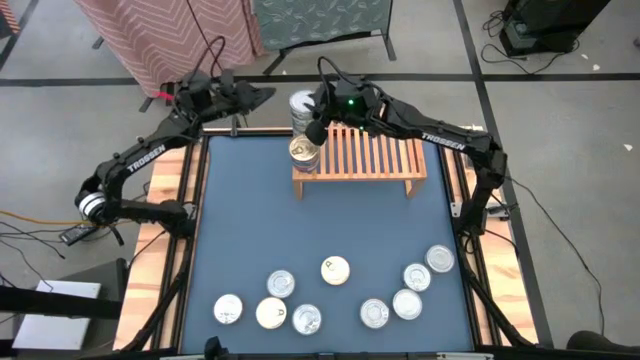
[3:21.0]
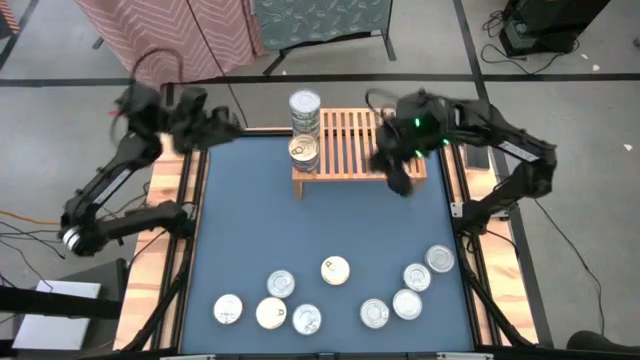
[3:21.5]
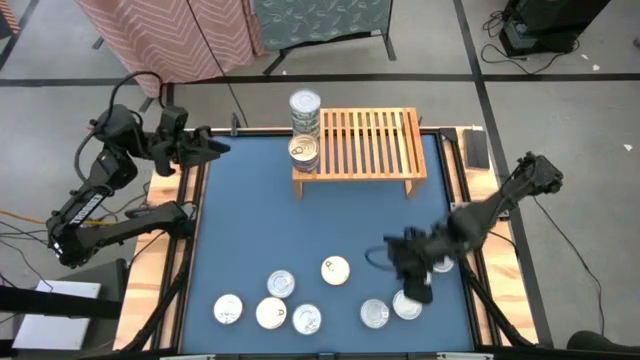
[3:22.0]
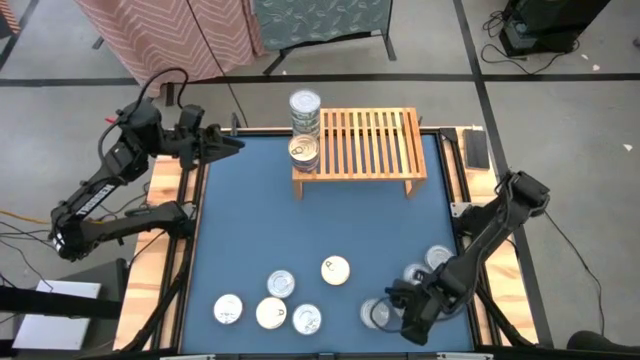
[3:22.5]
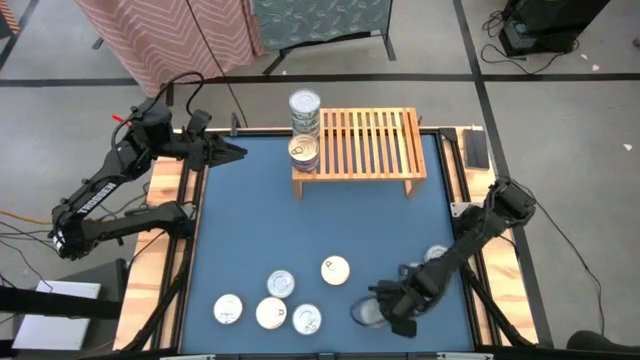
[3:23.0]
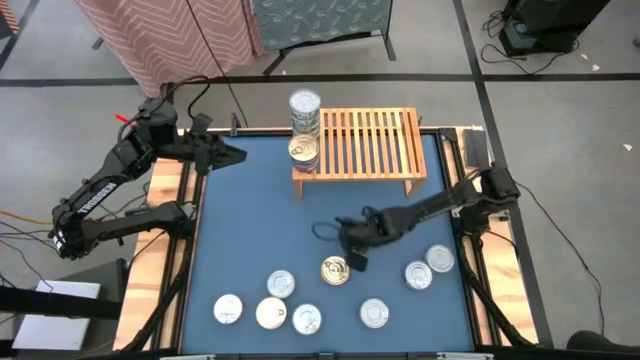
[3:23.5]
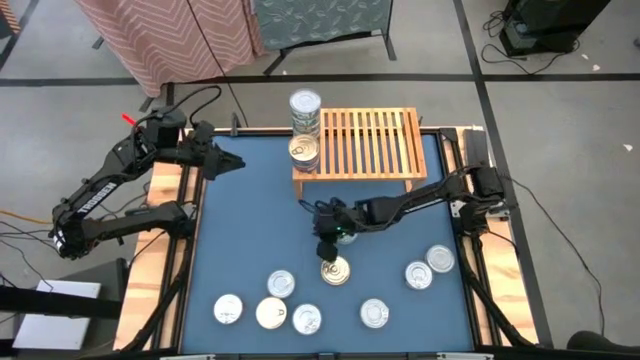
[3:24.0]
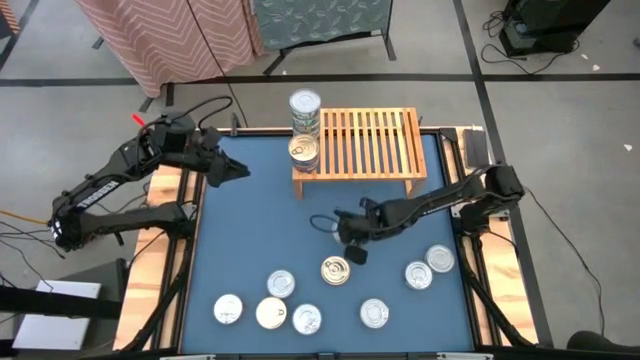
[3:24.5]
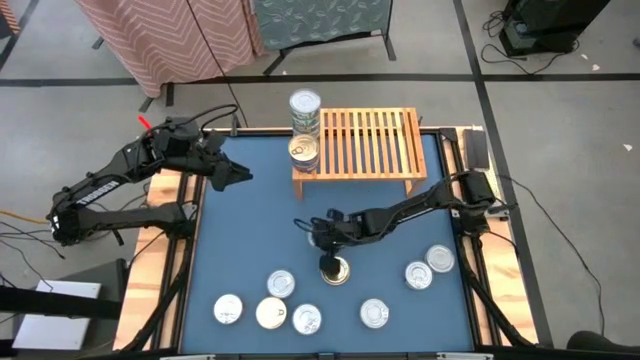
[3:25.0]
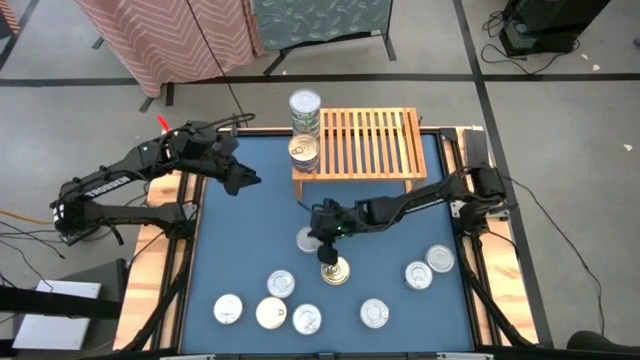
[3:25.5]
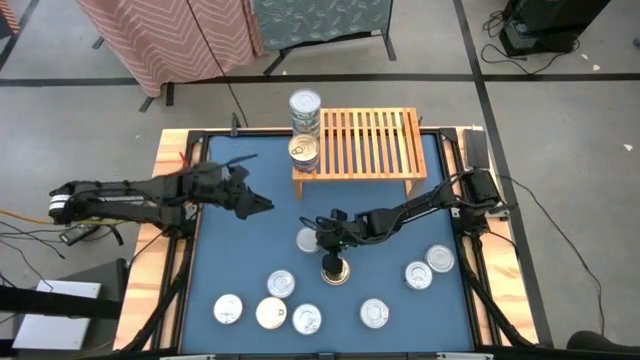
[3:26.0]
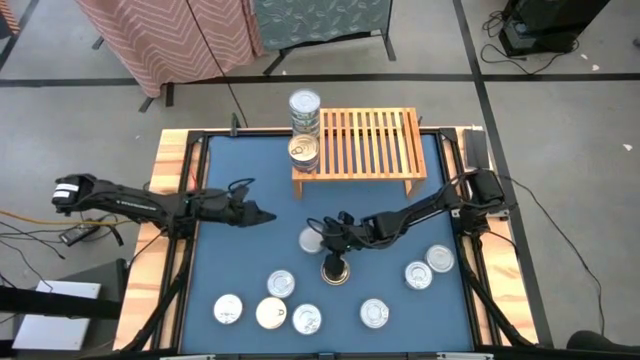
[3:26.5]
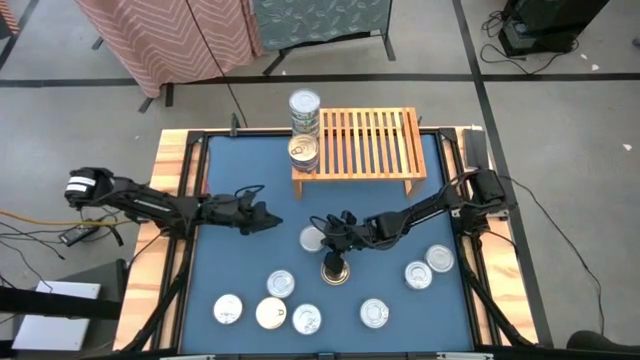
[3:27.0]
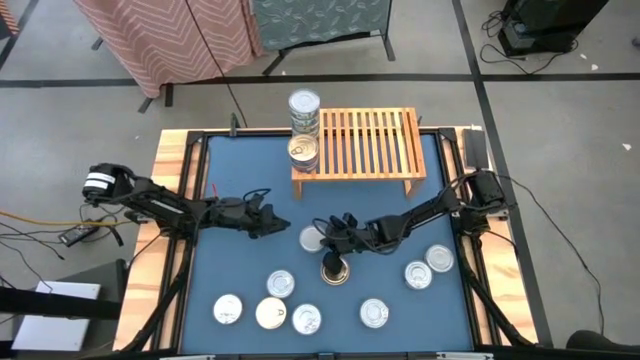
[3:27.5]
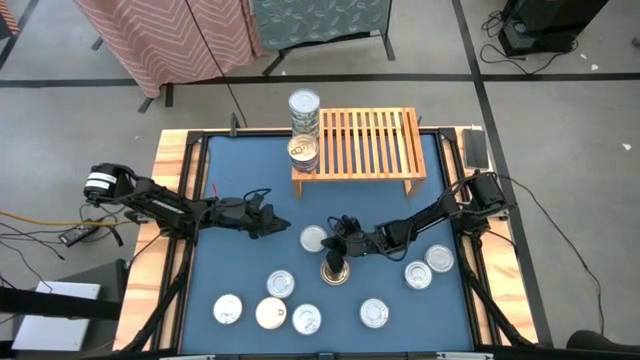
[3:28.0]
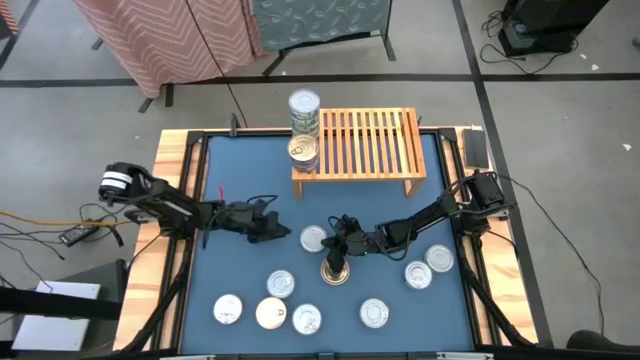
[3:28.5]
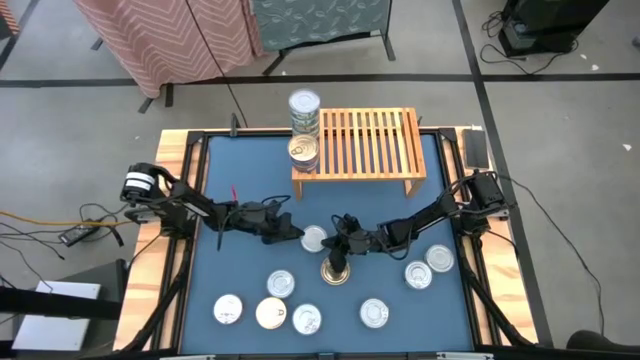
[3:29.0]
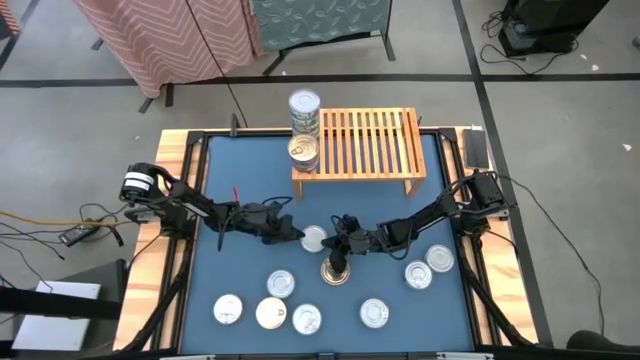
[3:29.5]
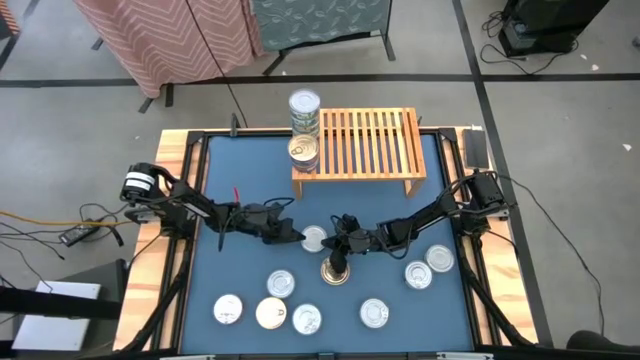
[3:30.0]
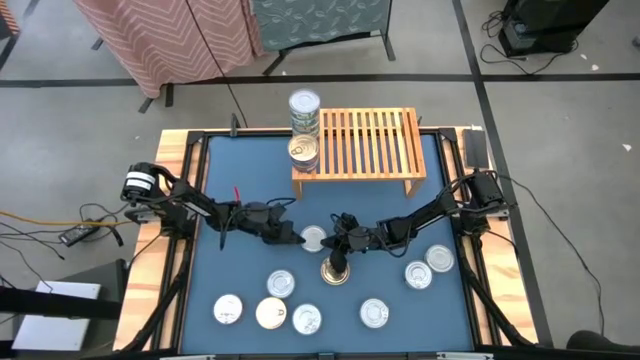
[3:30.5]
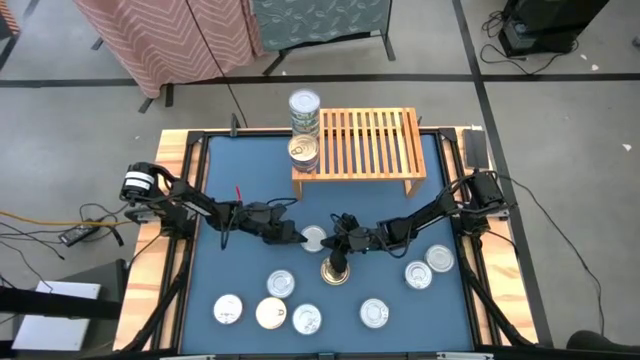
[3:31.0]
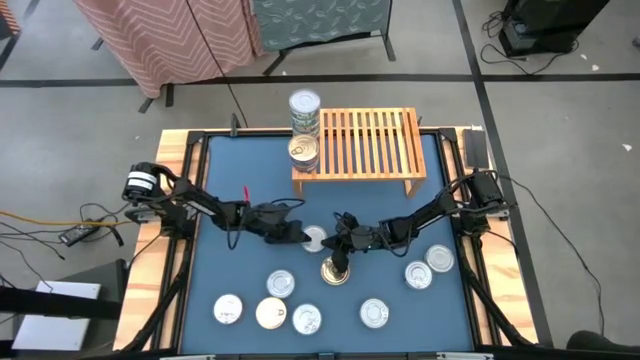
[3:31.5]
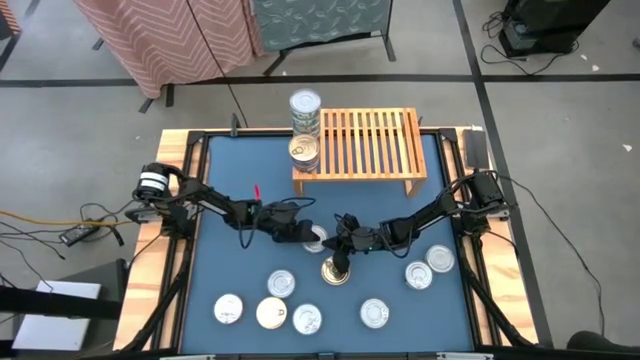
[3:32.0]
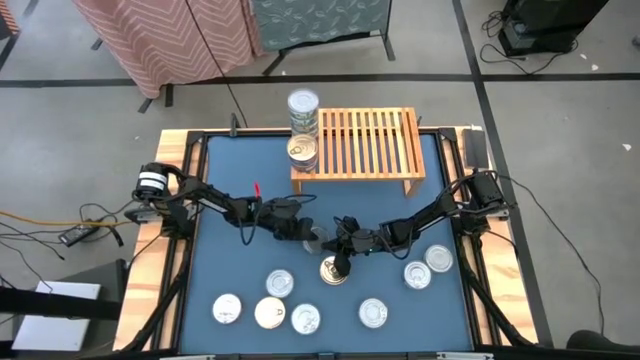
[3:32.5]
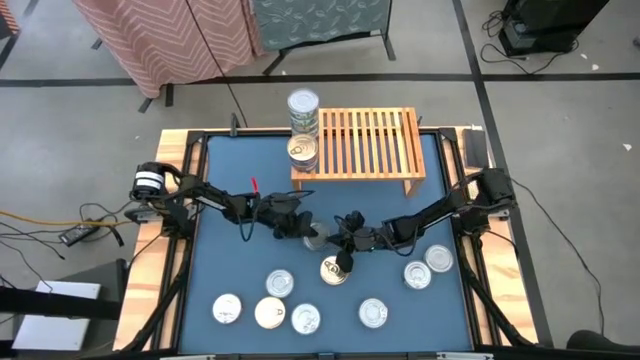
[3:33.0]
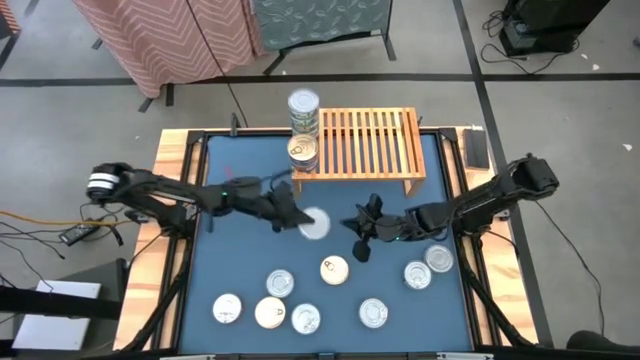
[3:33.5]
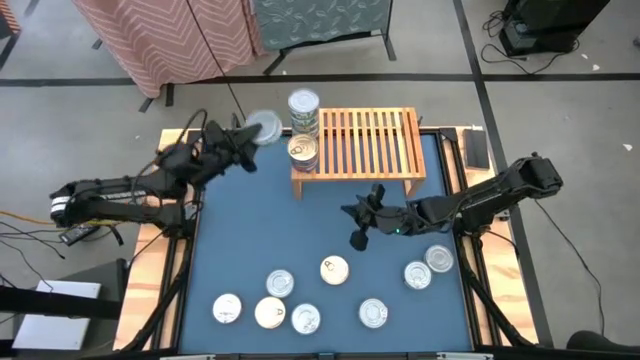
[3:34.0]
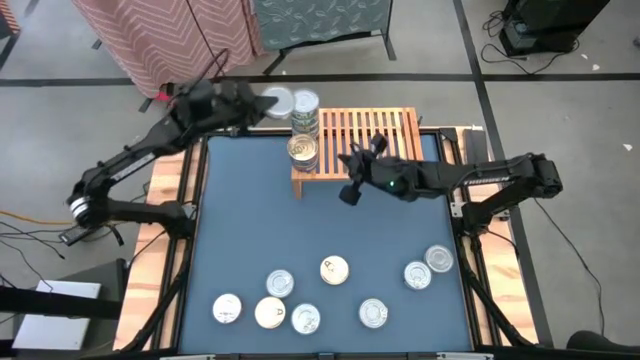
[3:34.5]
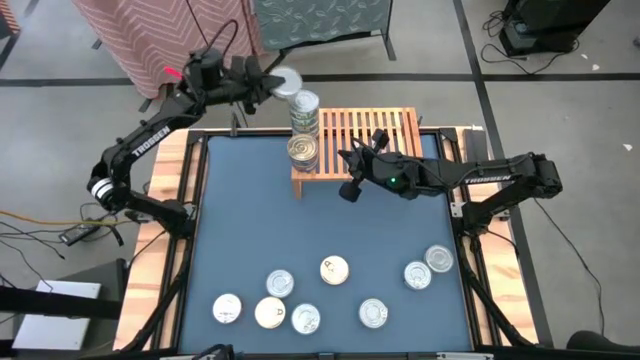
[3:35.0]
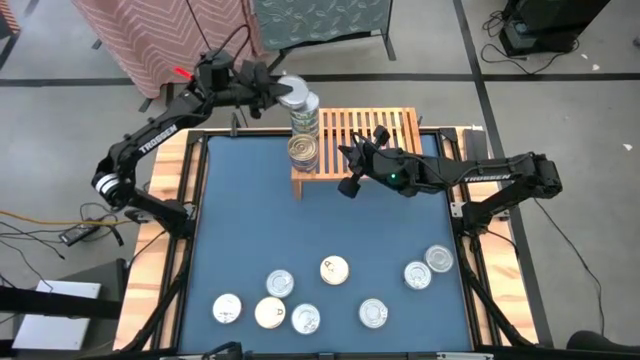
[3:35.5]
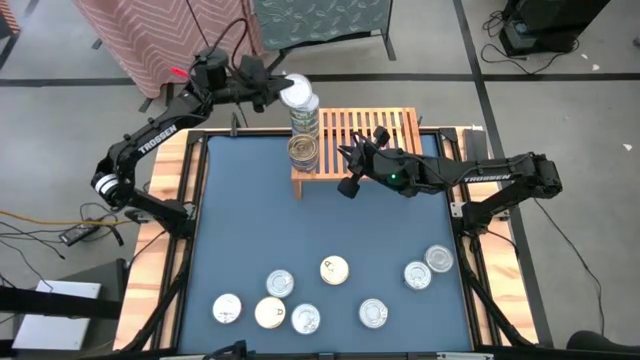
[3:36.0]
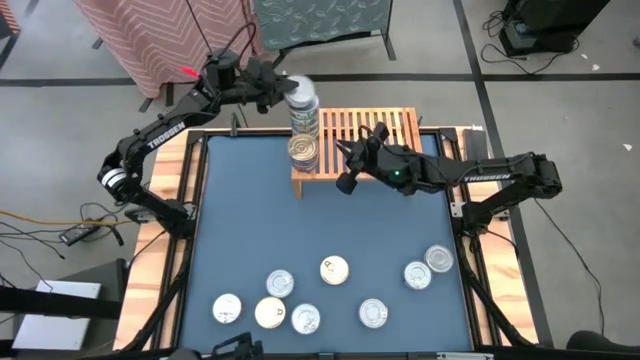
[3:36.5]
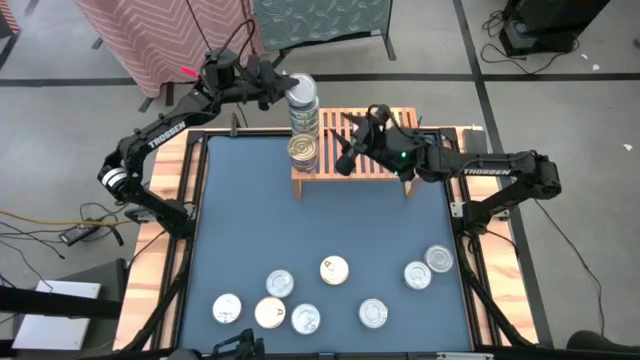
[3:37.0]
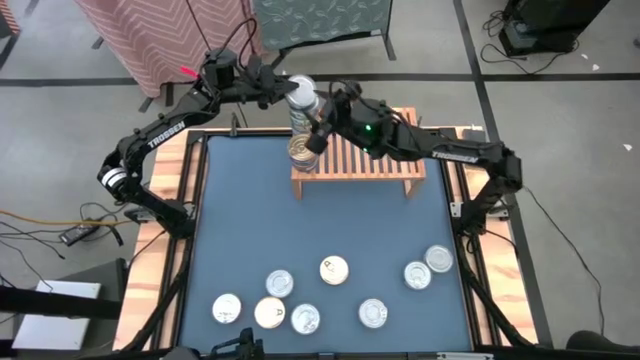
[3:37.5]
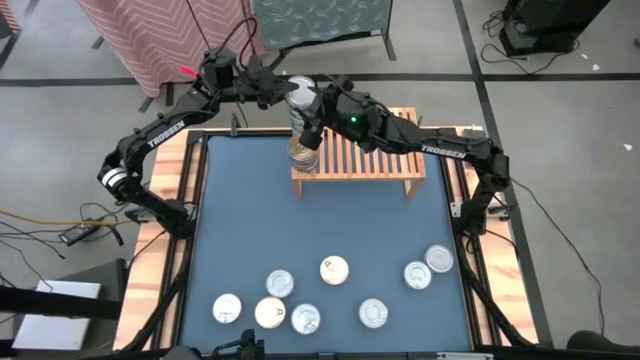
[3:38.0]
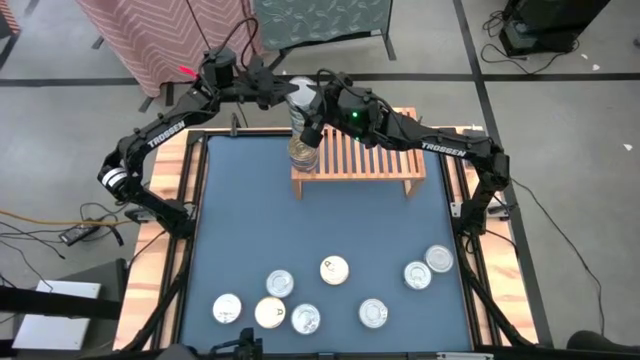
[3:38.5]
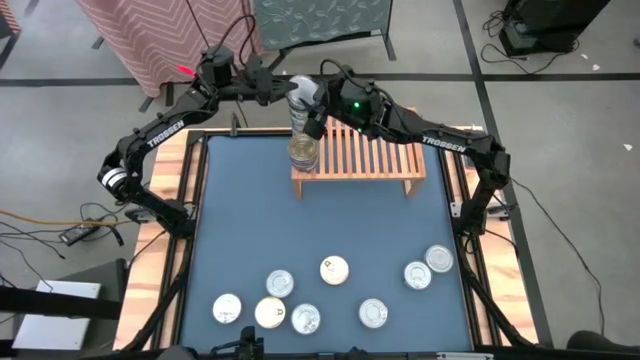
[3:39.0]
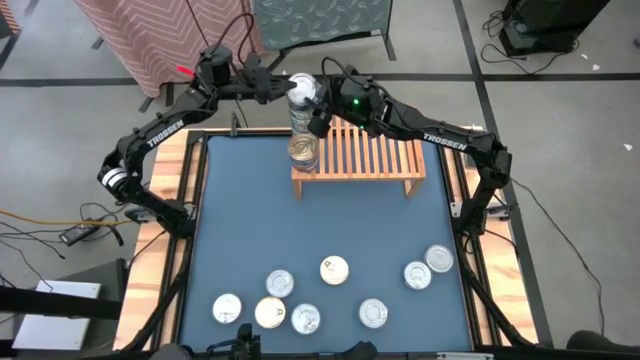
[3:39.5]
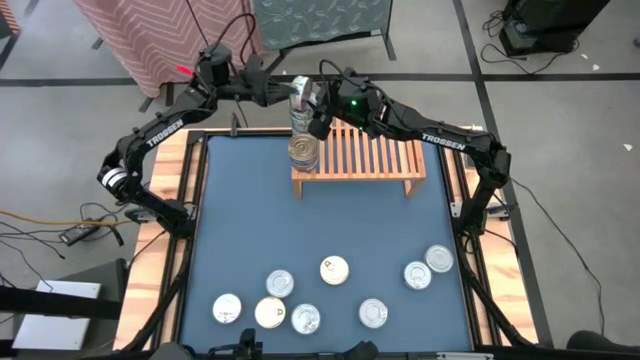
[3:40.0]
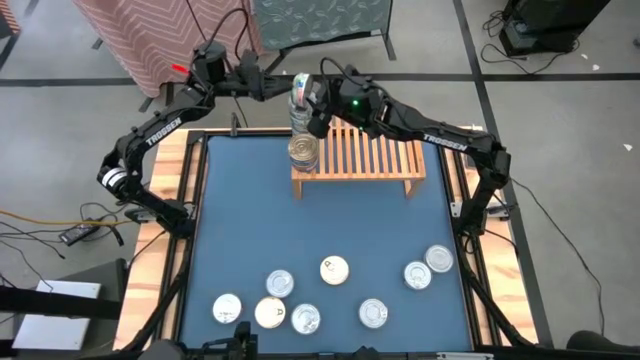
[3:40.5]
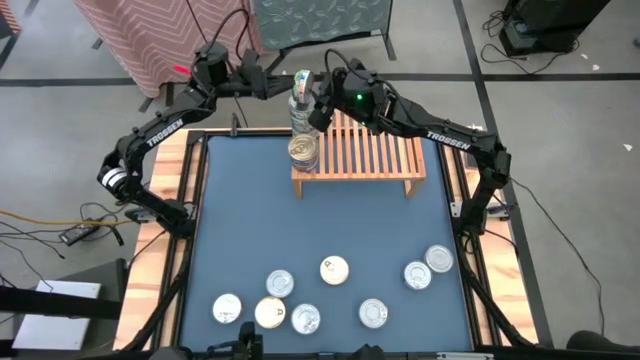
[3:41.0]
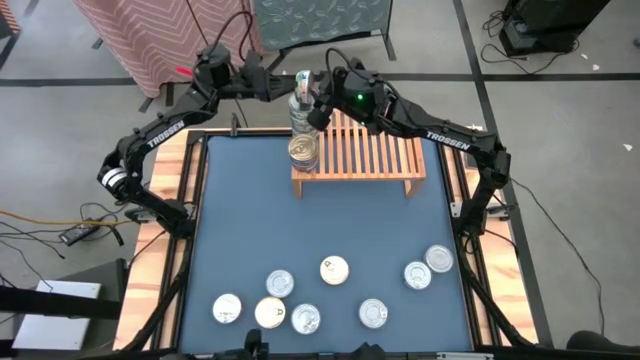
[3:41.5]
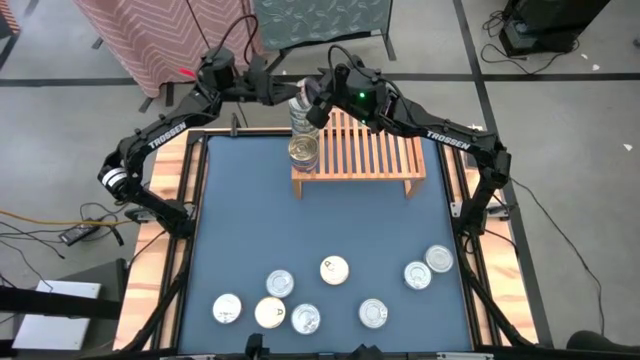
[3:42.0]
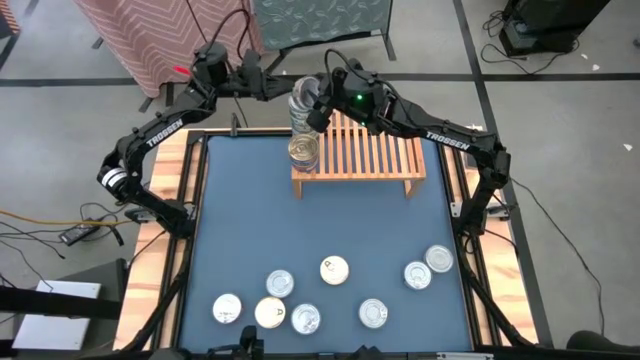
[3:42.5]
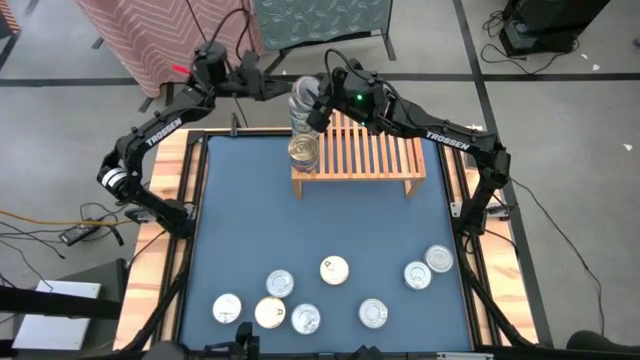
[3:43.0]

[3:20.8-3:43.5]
Task: Stack canned seafood by type on shelf
Stack the green tuna can on top of the other green tuna cans on the shelf

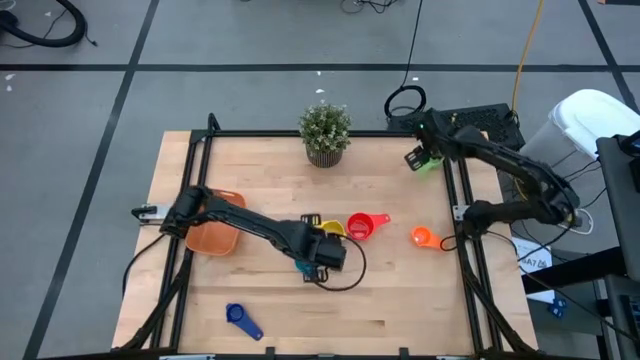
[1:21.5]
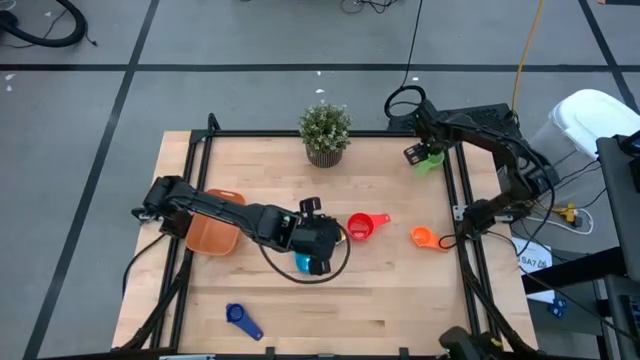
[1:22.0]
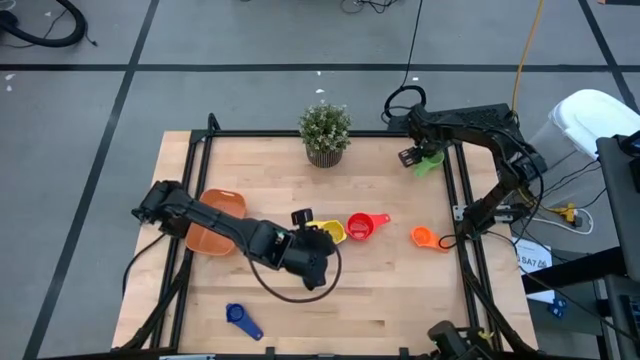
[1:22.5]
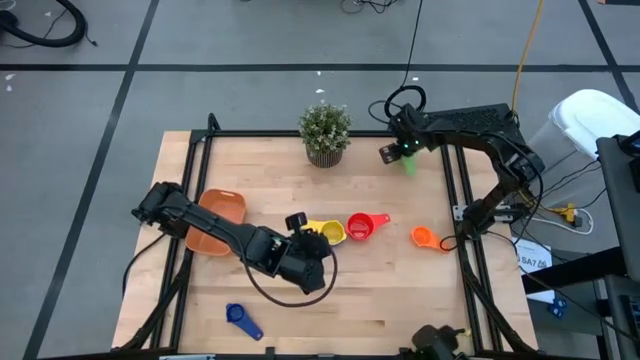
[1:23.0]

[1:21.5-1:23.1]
Task: Nest measuring cups in basket
Stack the green measuring cup on top of the yellow measuring cup
